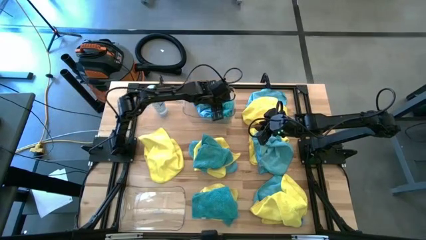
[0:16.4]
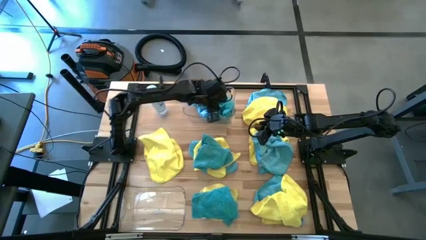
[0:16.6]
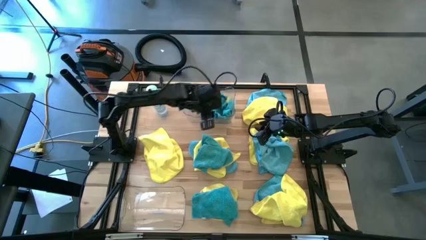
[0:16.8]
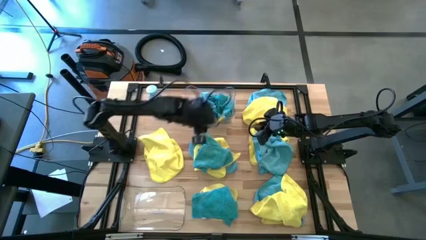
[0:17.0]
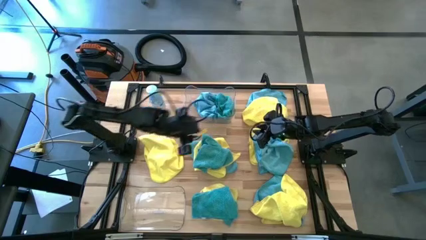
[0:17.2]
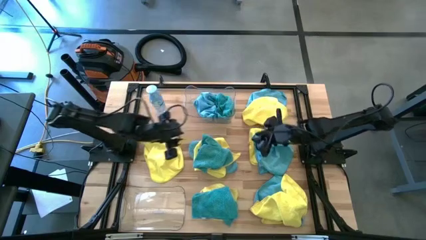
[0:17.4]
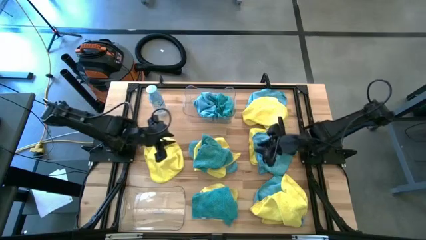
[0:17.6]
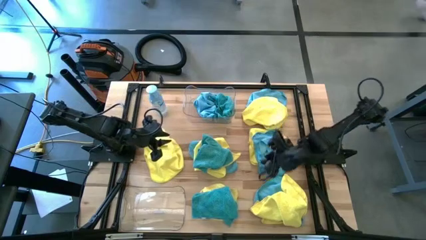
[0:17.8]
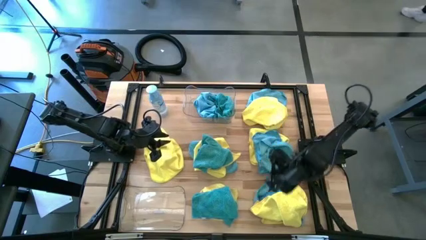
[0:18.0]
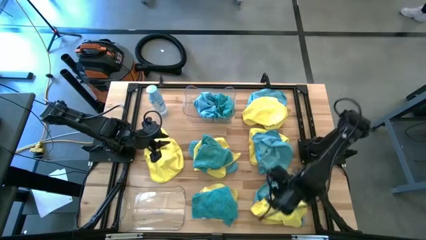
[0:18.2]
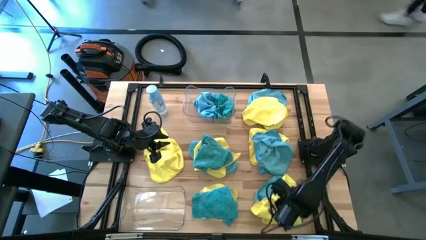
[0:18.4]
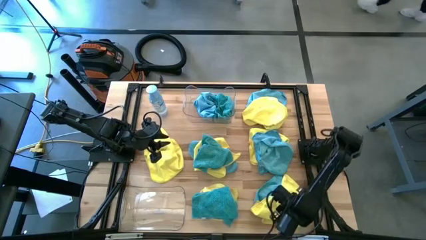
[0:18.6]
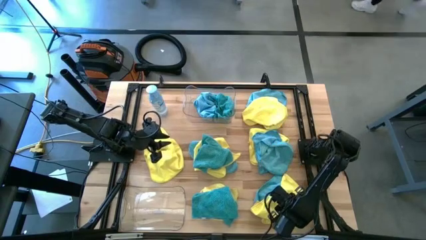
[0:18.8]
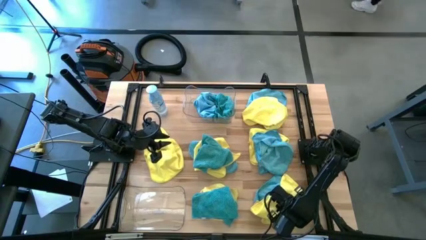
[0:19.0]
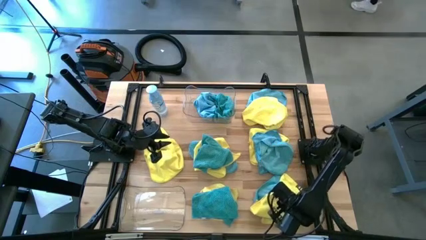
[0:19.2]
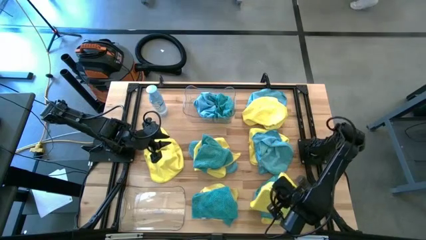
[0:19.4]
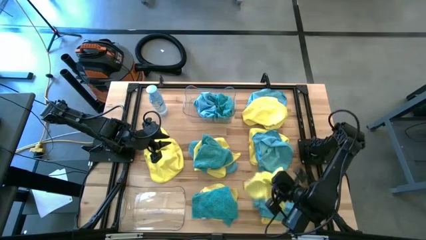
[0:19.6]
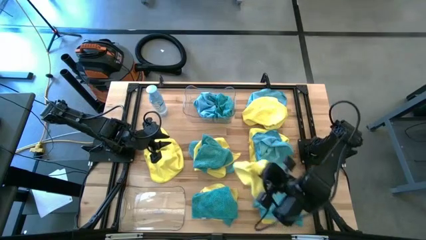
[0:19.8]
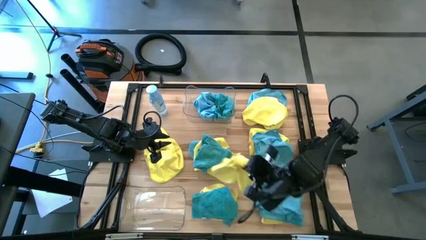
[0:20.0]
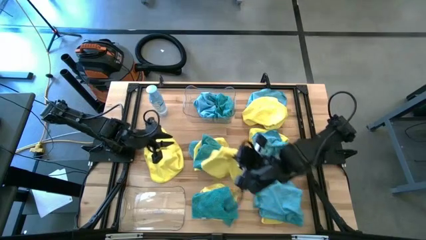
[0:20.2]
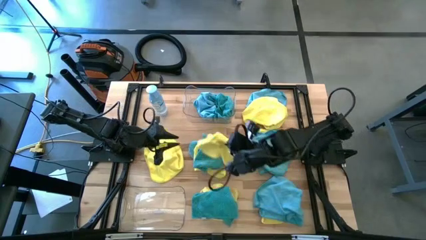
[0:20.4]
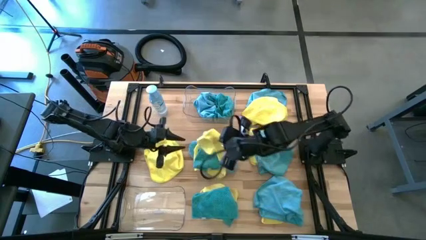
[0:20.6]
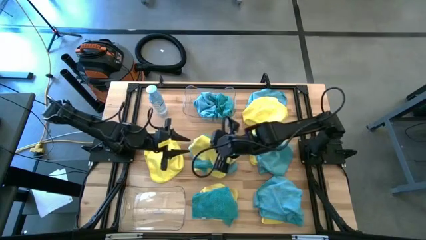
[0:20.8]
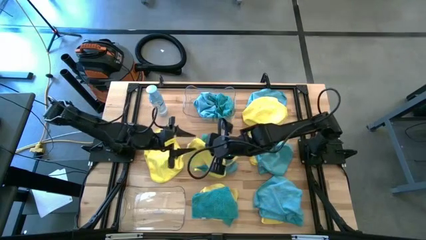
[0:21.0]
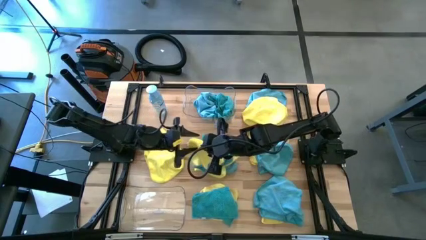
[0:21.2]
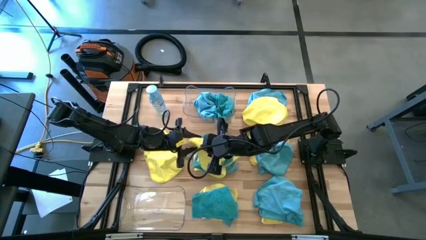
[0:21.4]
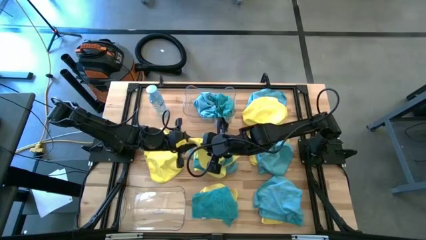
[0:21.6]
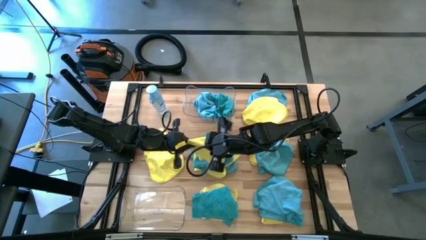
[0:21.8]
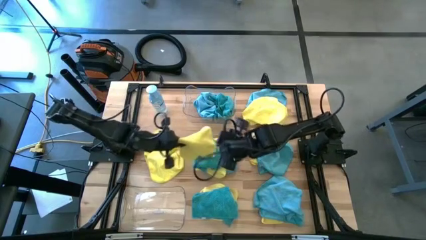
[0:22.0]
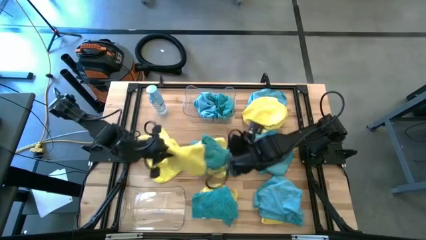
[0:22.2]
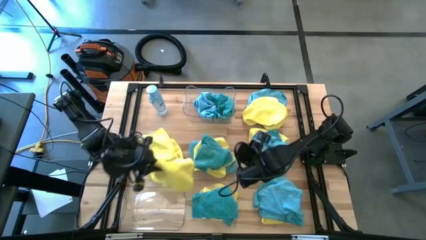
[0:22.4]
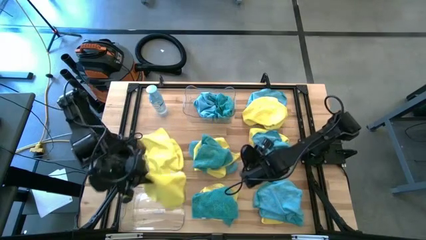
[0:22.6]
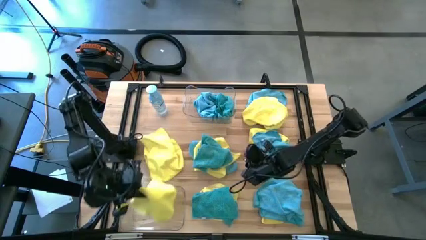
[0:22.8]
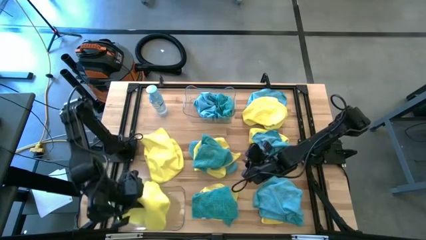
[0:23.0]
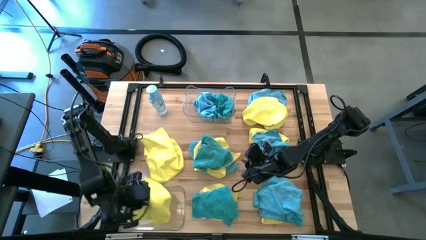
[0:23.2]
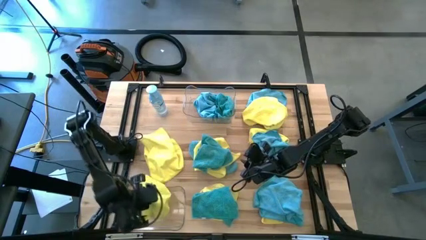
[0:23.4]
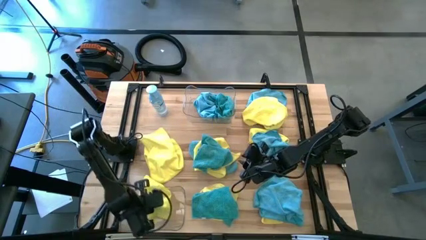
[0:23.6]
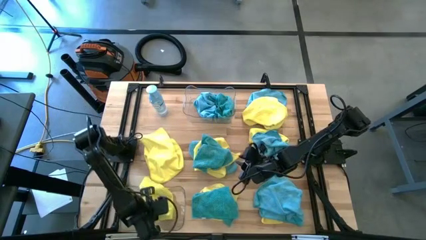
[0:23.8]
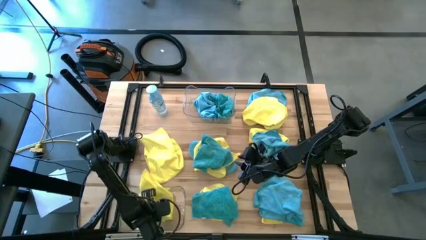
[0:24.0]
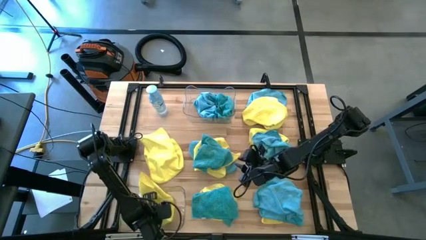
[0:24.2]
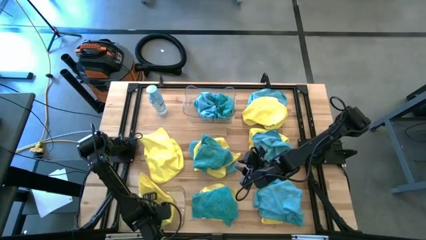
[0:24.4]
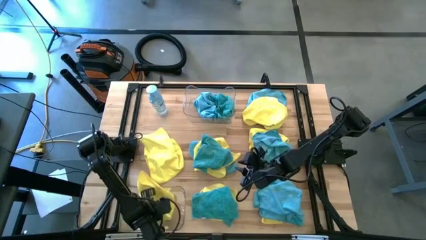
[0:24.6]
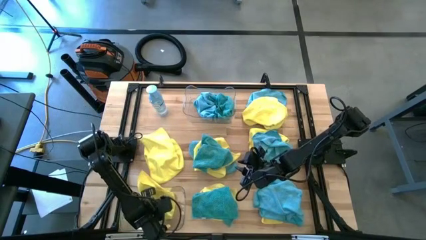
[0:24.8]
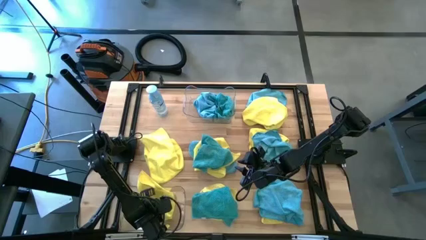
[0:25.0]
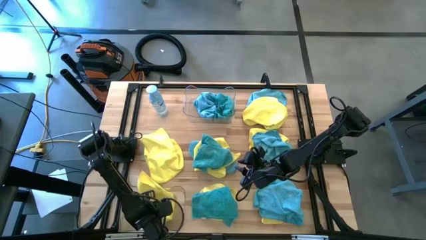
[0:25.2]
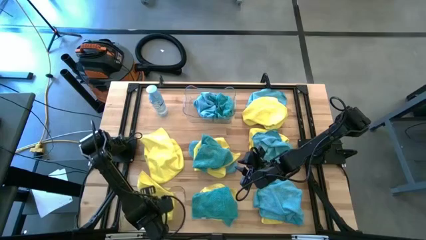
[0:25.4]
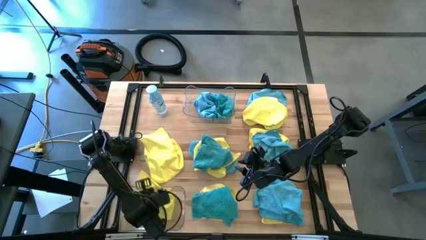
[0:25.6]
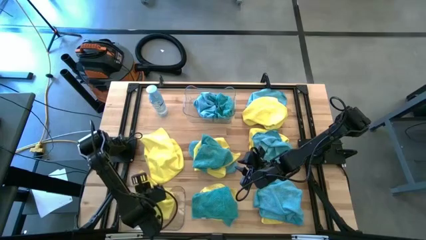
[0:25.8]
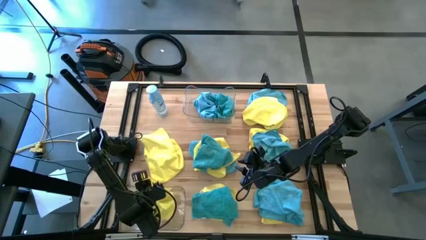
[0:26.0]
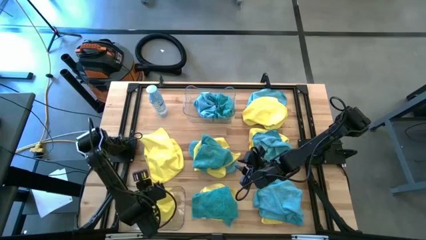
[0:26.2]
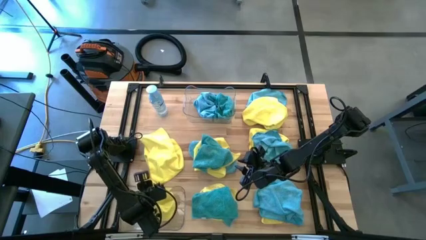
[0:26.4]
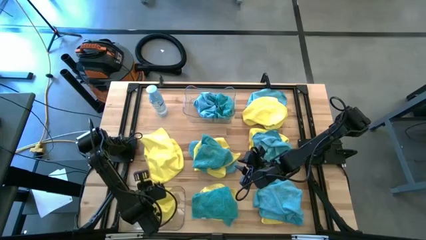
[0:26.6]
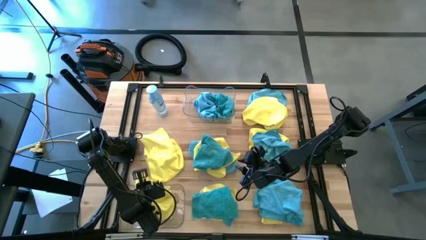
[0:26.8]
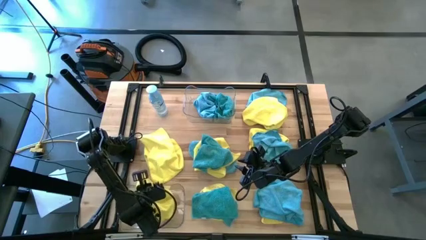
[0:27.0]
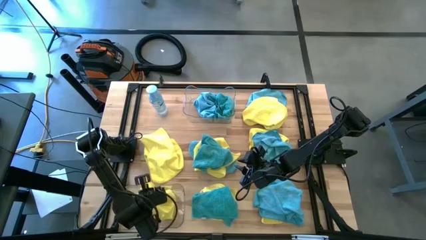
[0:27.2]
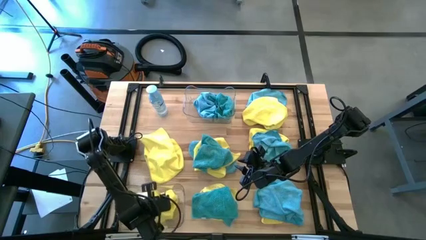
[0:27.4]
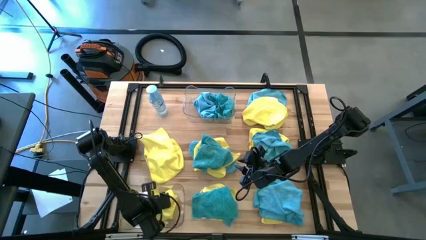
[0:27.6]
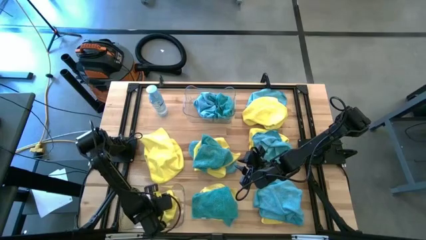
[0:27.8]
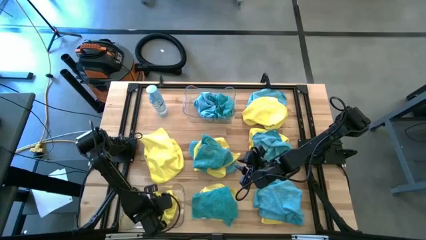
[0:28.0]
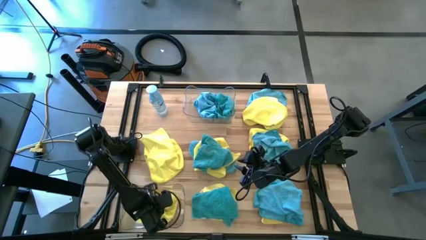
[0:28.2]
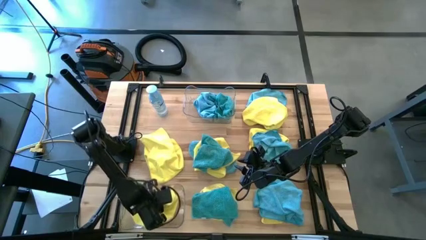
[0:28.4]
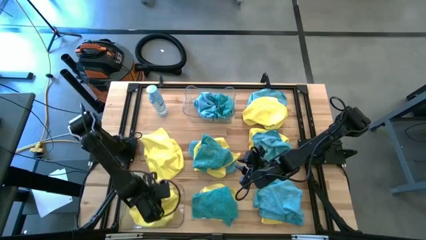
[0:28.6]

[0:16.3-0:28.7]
Task: Sort microfiber towel by color & place in baskets
Put the yellow microfiber towel into the bottom transparent bin

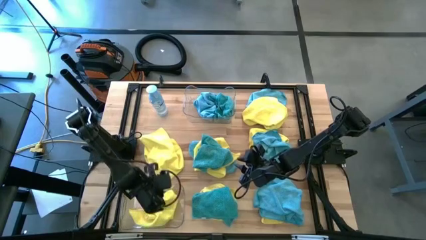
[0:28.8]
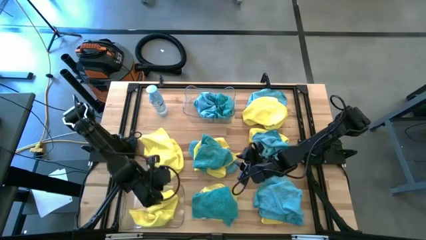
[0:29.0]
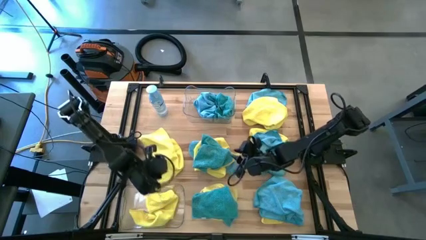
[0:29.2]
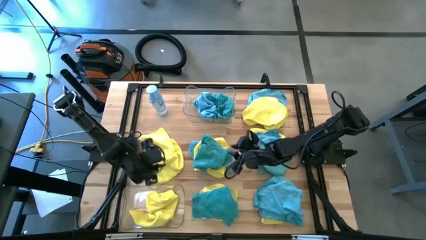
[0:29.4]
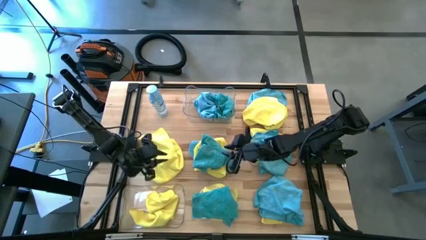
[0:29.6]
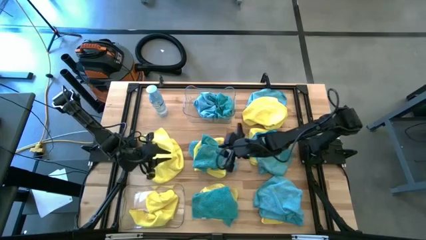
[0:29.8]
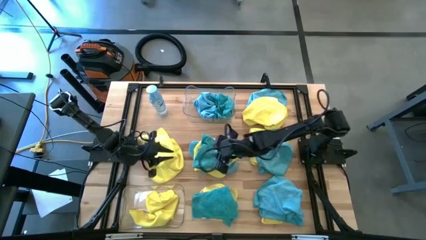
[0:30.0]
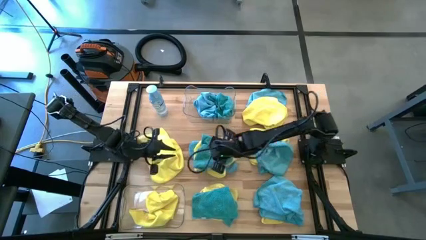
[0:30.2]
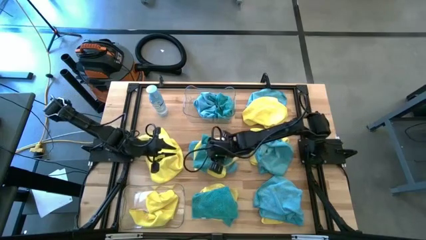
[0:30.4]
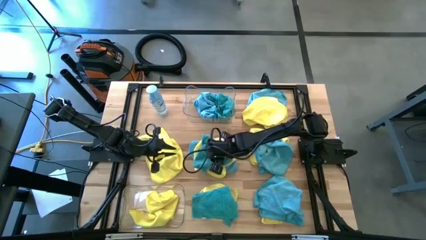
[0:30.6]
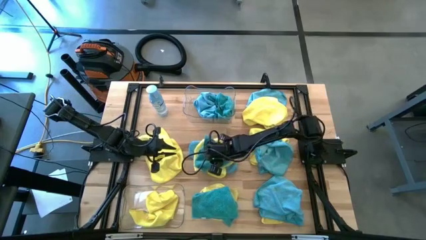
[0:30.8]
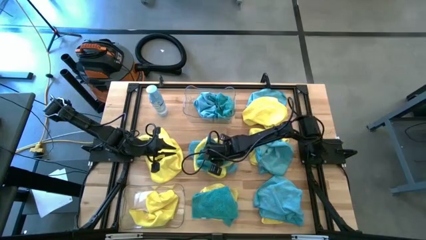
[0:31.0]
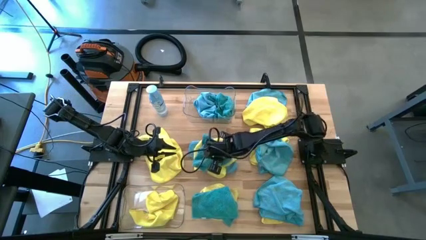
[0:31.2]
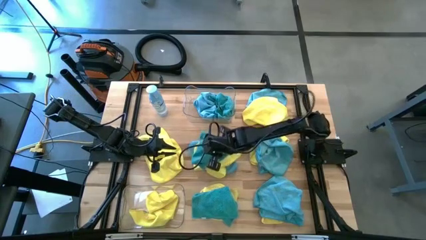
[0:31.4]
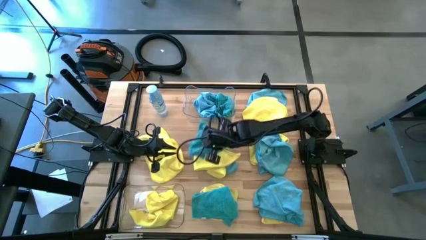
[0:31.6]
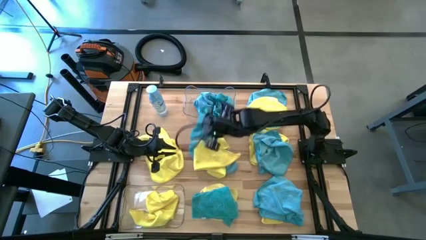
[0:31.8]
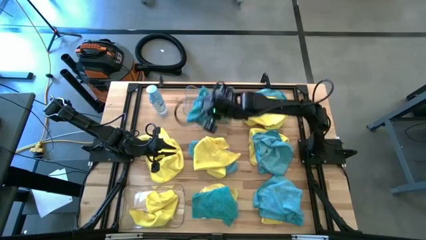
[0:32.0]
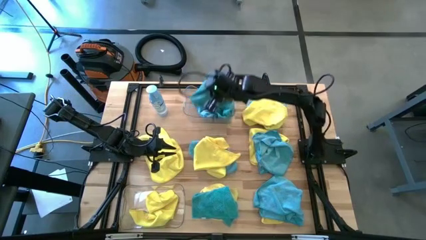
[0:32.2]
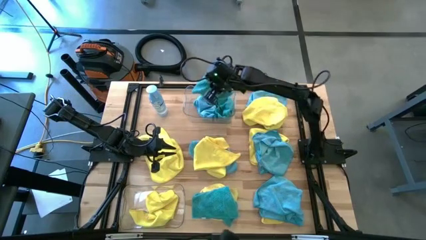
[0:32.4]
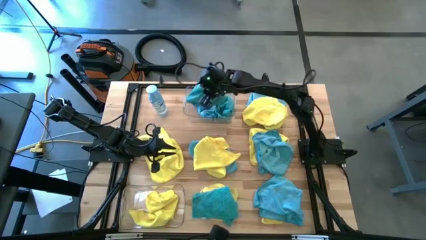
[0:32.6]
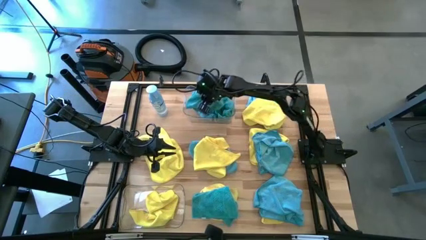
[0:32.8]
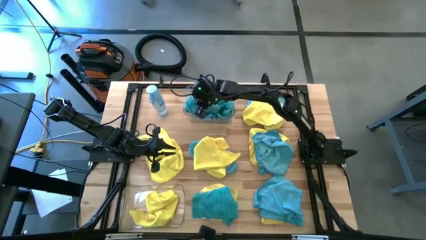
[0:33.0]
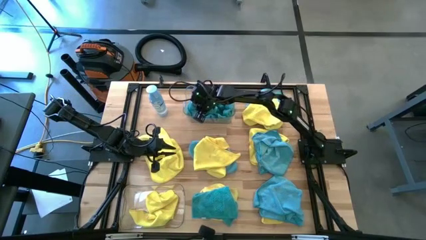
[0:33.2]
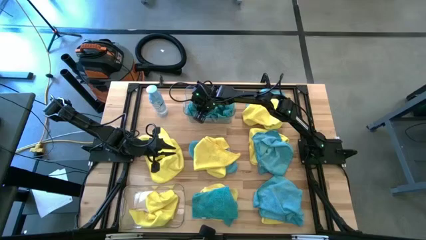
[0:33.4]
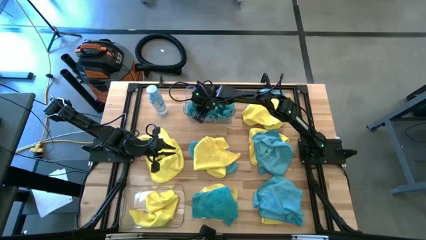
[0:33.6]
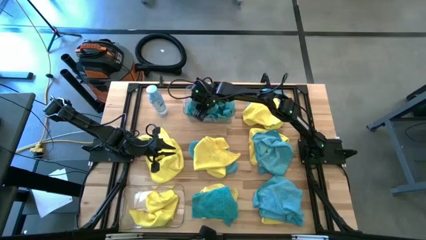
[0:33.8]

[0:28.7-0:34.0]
Put the blue microfiber towel into the top transparent bin
